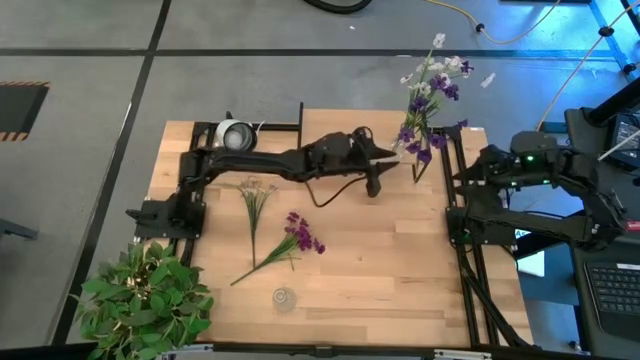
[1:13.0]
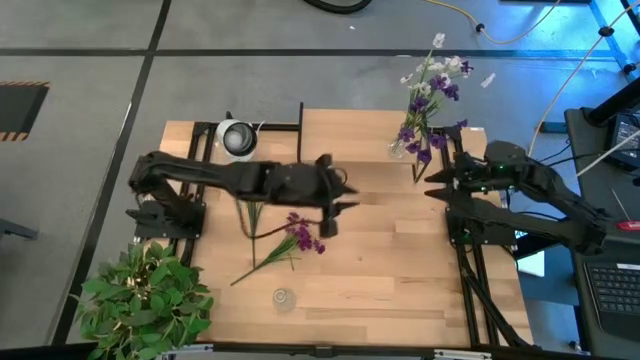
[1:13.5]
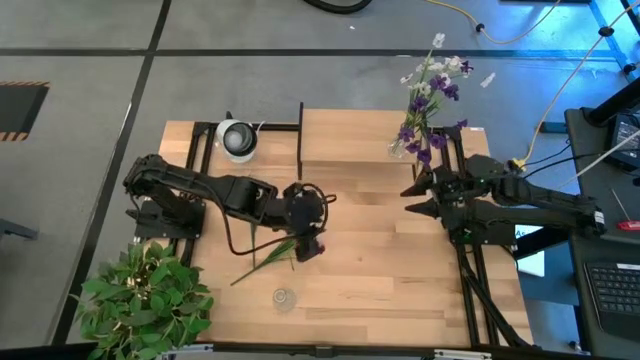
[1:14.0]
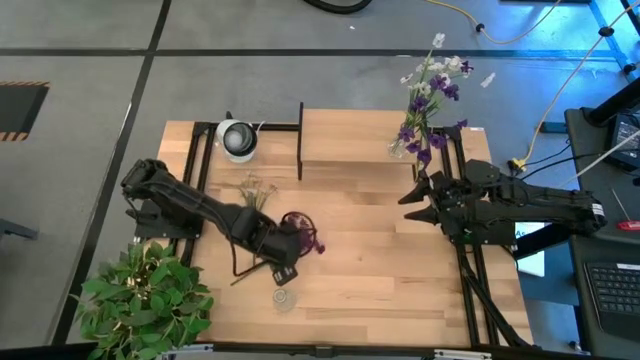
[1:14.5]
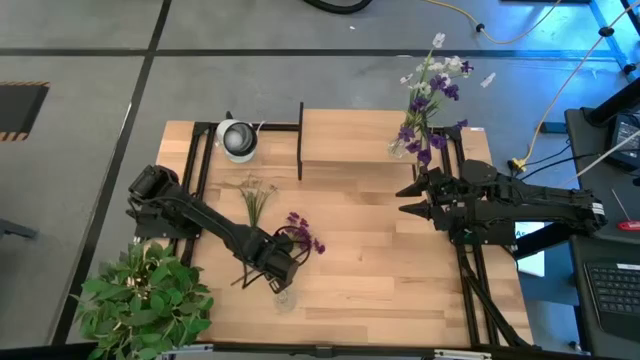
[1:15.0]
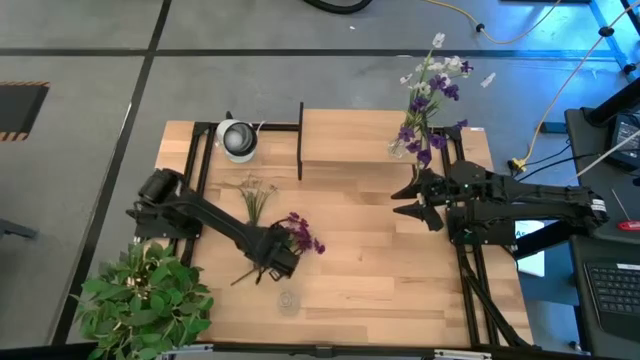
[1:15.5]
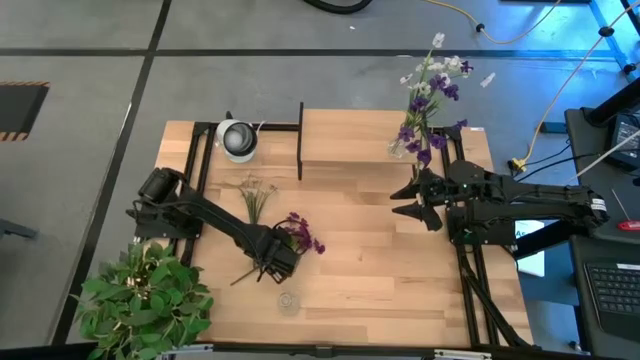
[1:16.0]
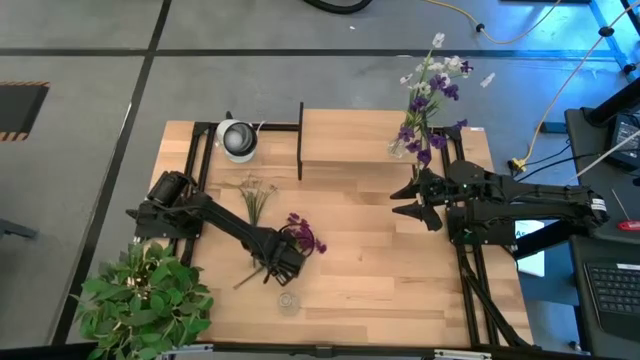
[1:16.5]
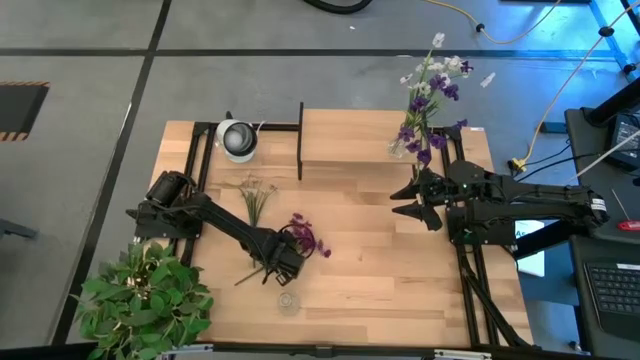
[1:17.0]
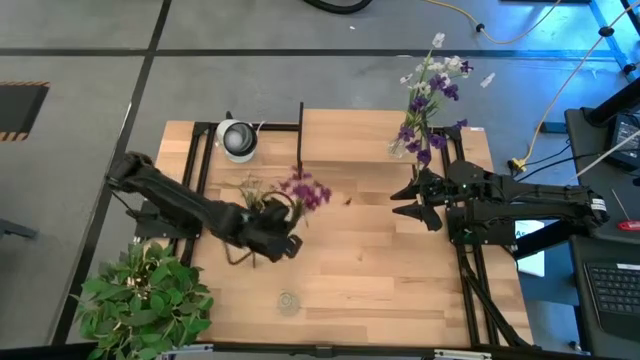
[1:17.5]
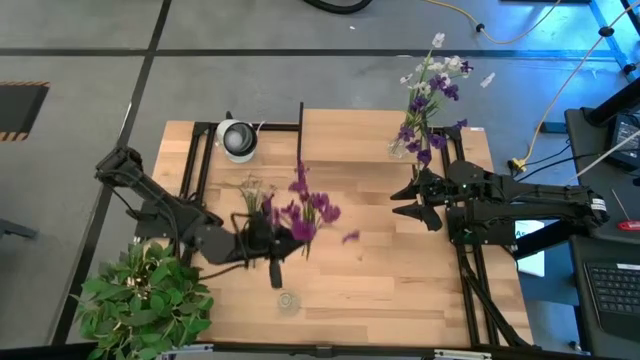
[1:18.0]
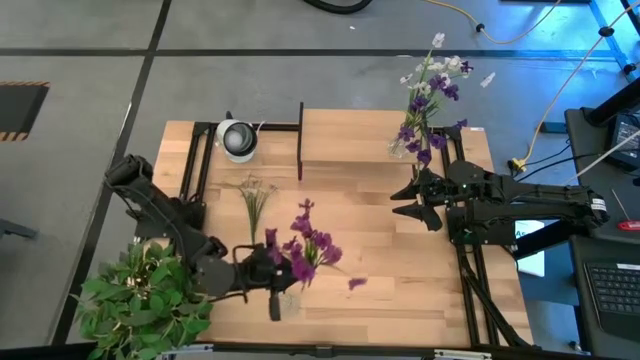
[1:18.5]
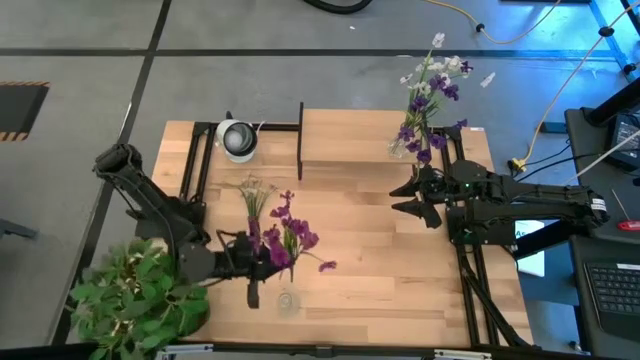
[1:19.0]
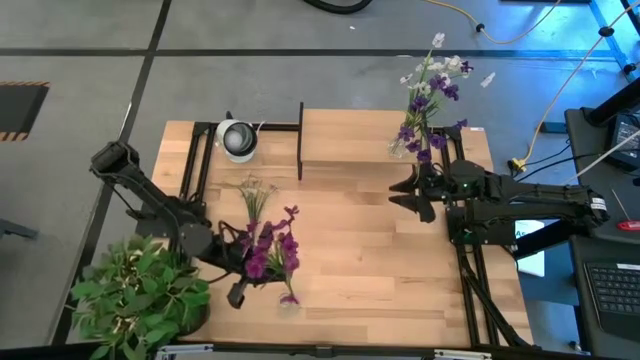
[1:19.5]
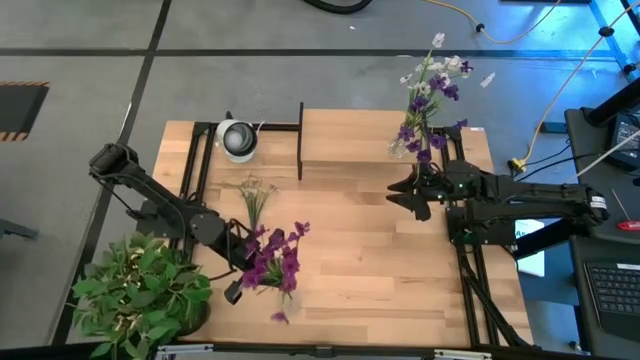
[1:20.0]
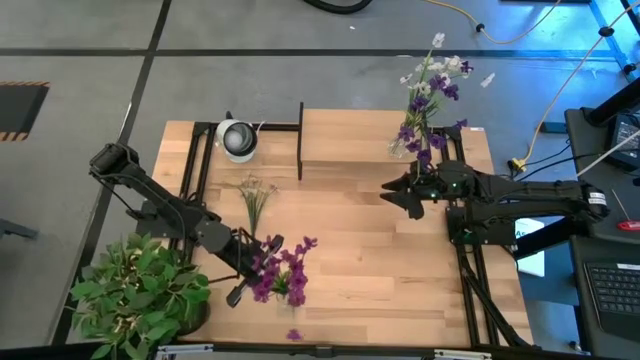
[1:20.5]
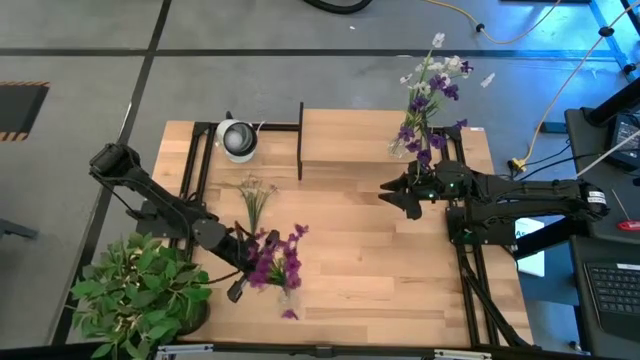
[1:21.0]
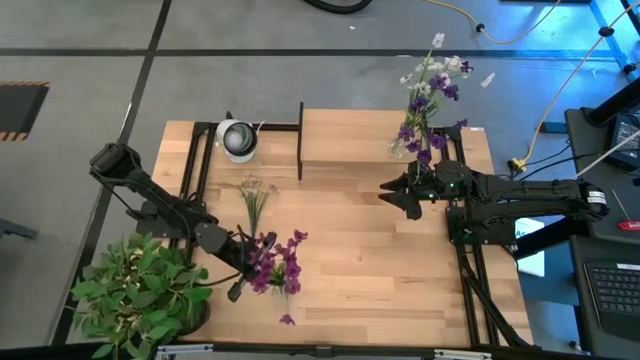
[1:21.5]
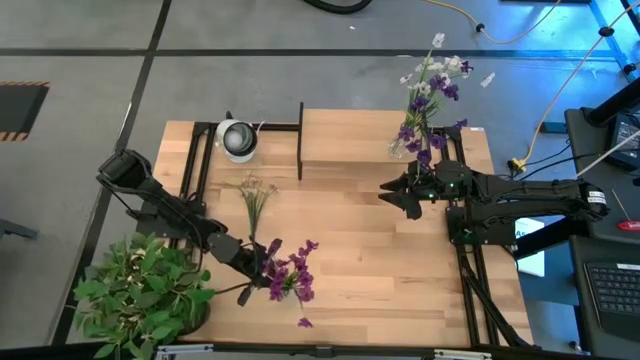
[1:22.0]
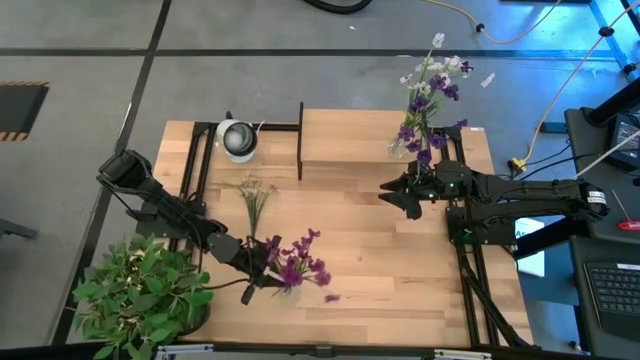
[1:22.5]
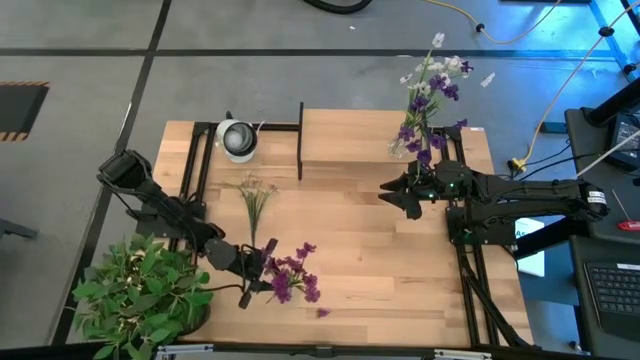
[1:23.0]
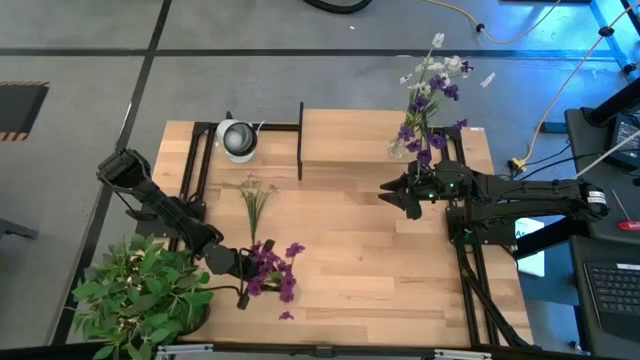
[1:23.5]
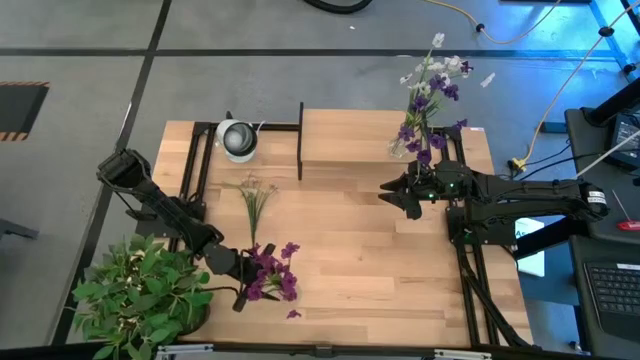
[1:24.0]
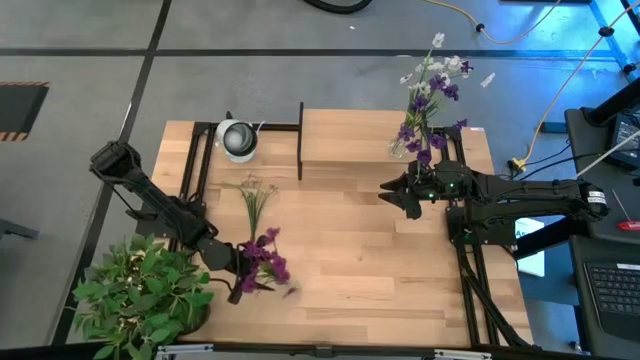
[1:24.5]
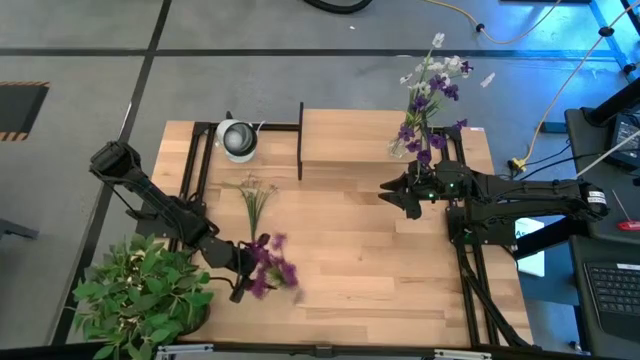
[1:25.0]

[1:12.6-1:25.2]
Task: Pick and place flowers into a vace then onto a shelf
Put the violet flowers into the transparent vase

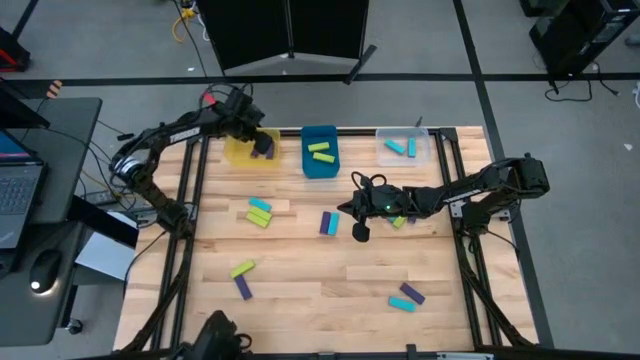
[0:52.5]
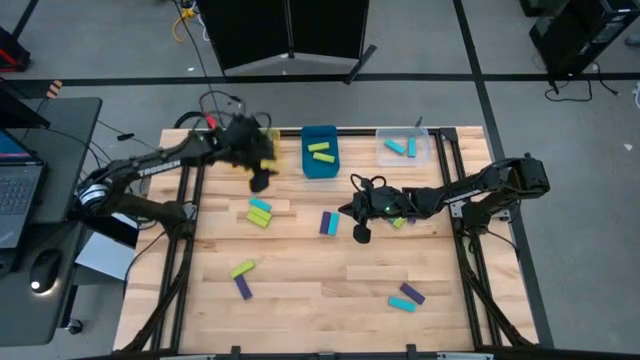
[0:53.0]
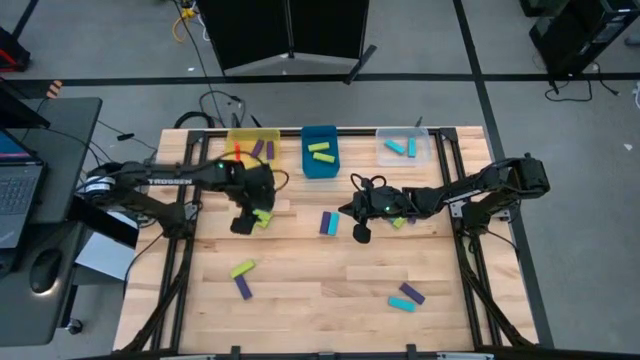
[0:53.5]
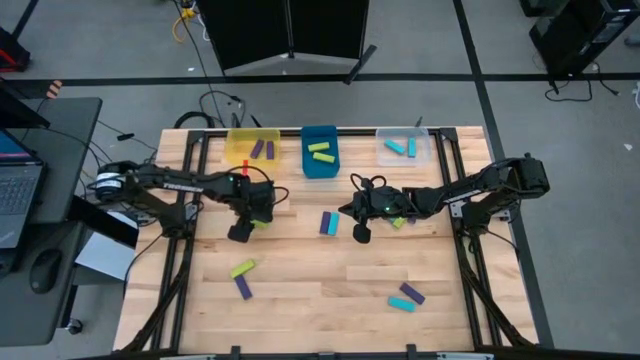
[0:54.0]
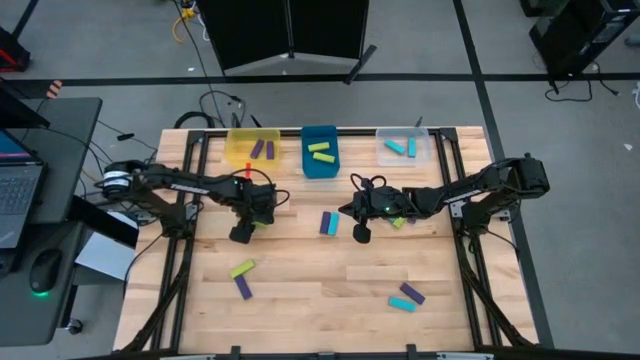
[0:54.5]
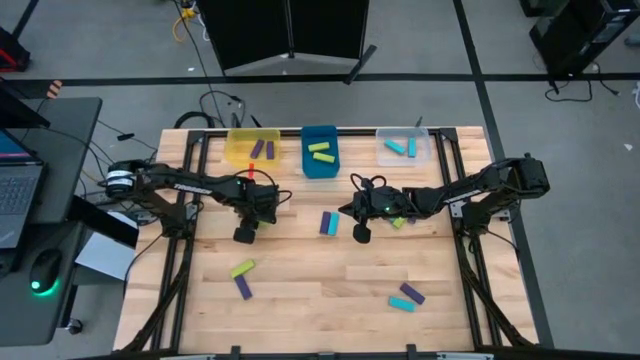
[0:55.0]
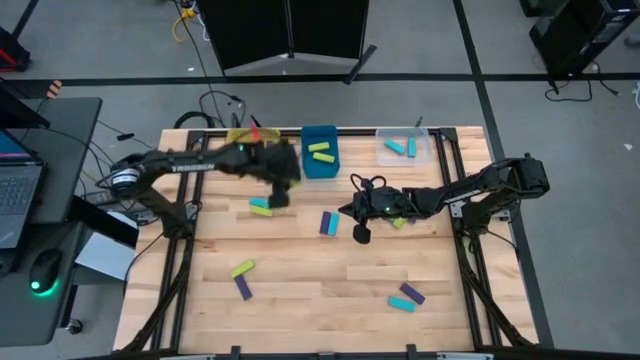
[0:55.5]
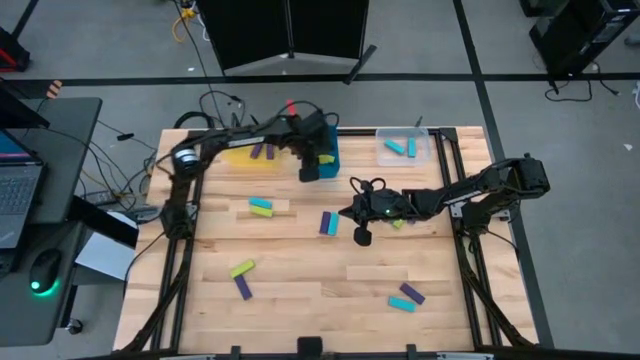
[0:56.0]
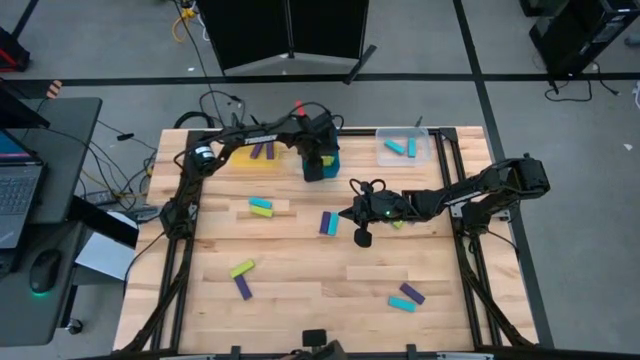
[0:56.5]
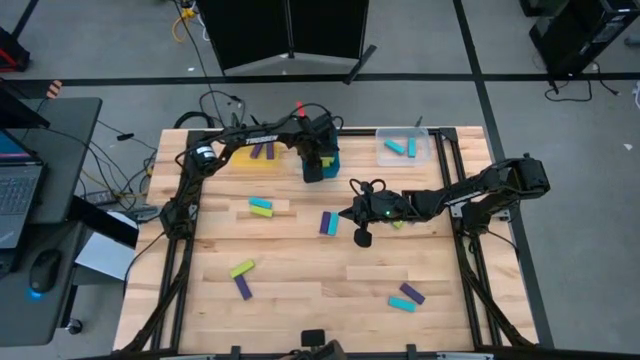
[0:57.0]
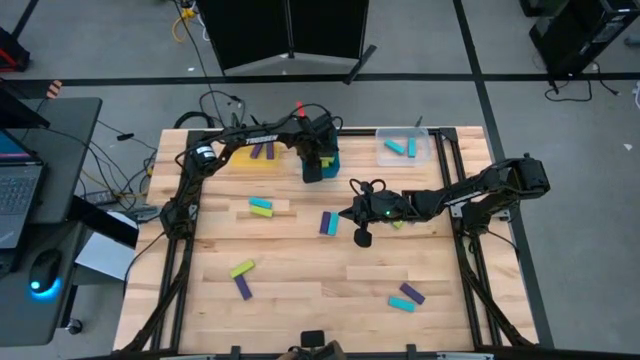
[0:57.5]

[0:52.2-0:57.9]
Task: Sort blocks
Put the green block into the blue bin
